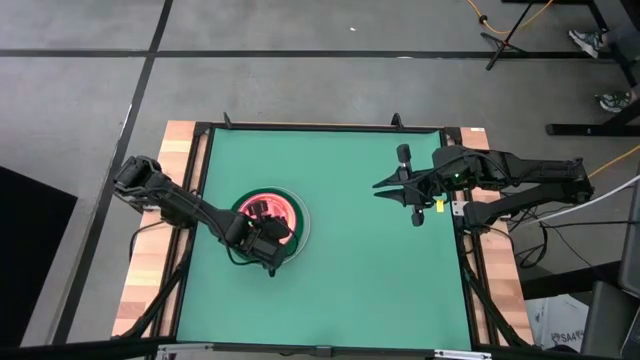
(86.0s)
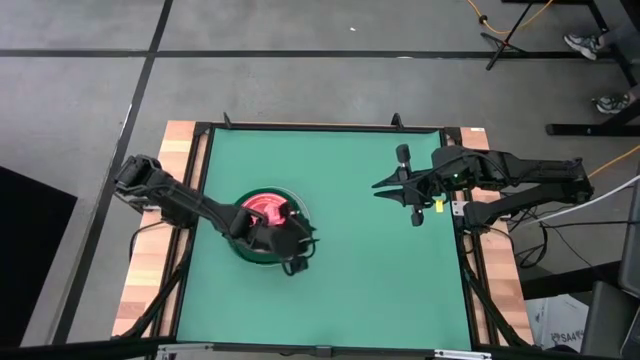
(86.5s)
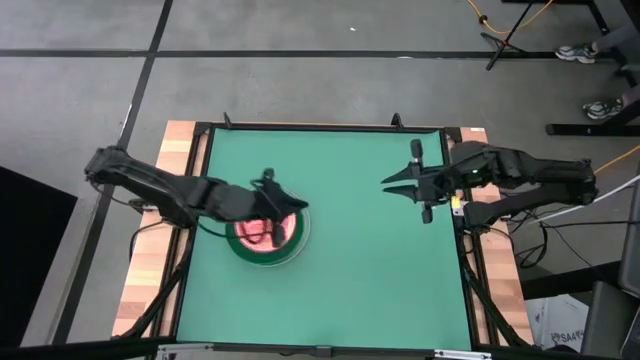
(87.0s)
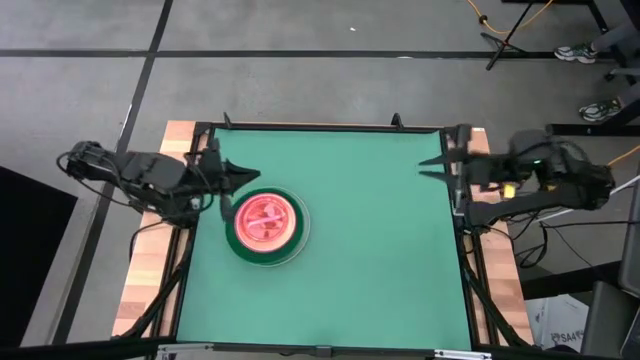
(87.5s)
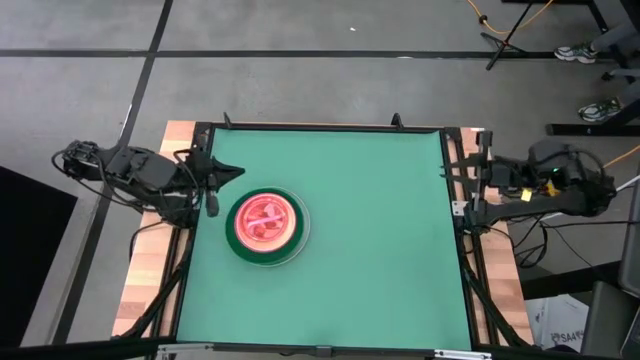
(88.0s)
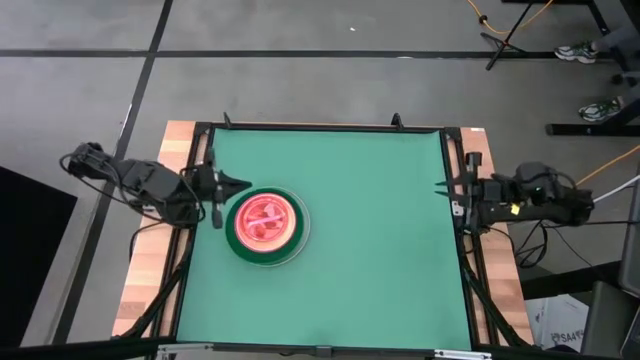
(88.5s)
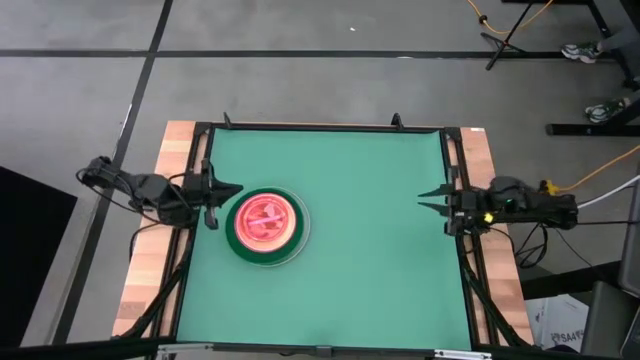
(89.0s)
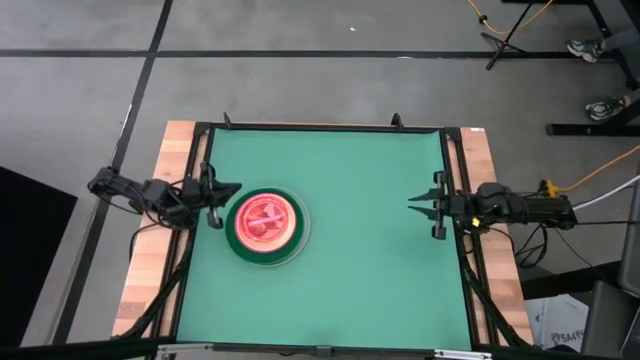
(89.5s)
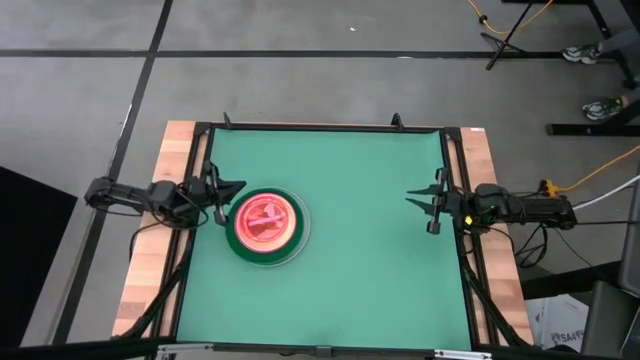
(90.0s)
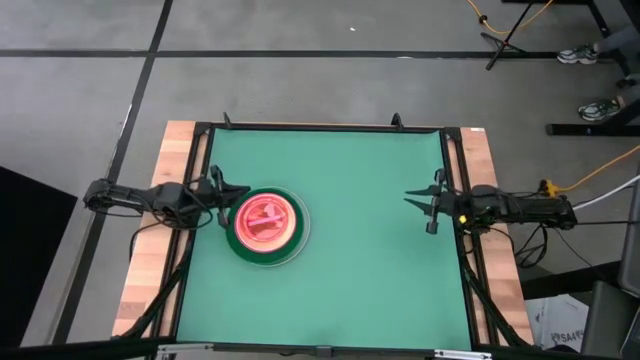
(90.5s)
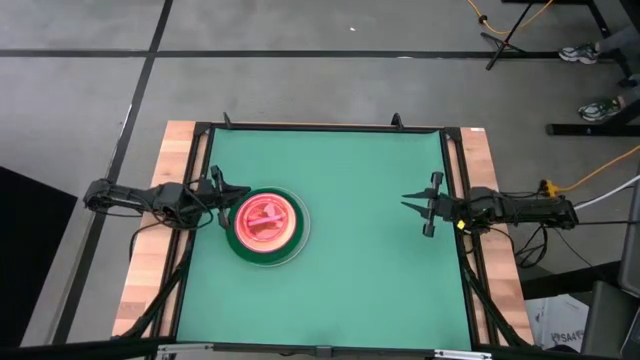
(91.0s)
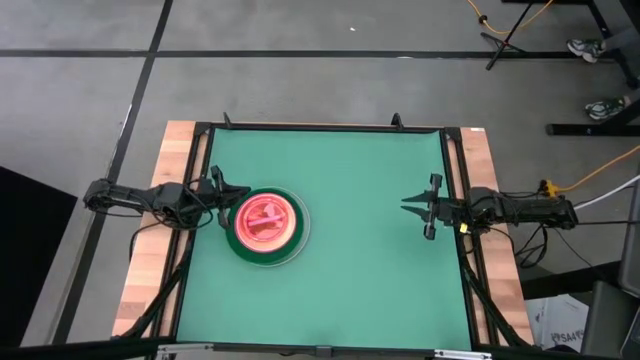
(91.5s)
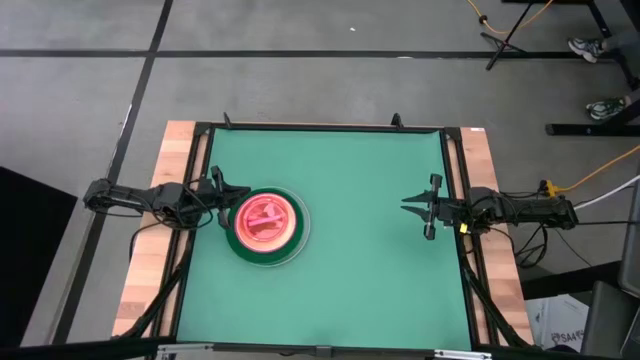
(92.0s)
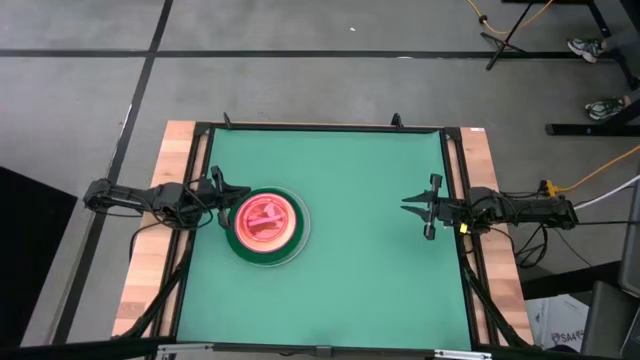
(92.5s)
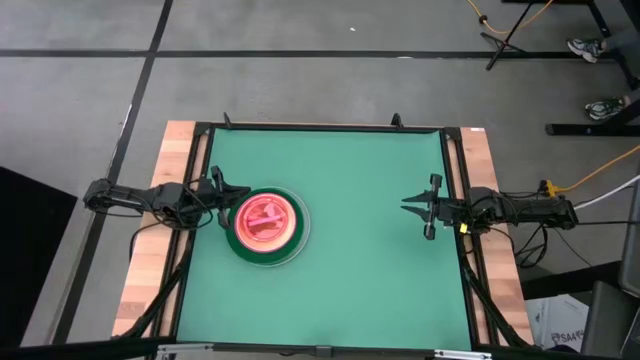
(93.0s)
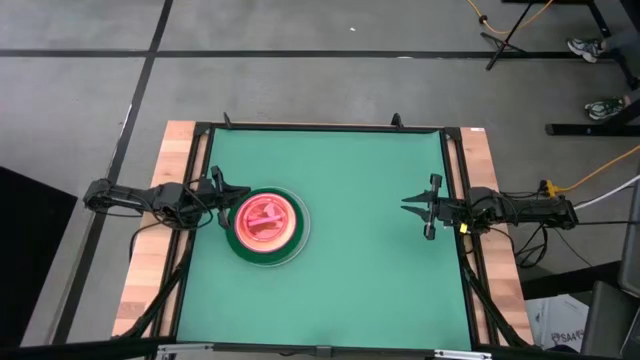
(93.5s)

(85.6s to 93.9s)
Task: Stack plastic plates
Return to Home Position

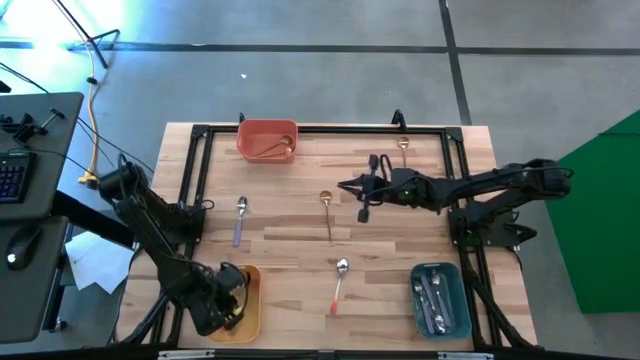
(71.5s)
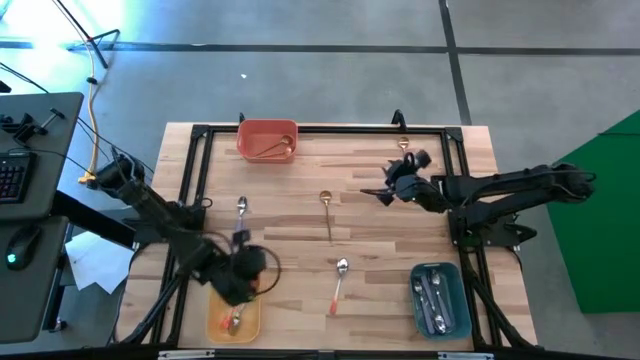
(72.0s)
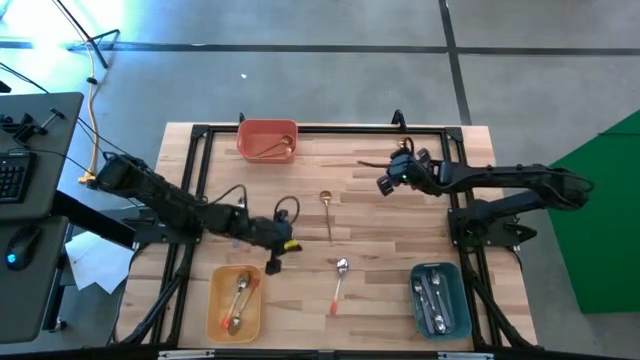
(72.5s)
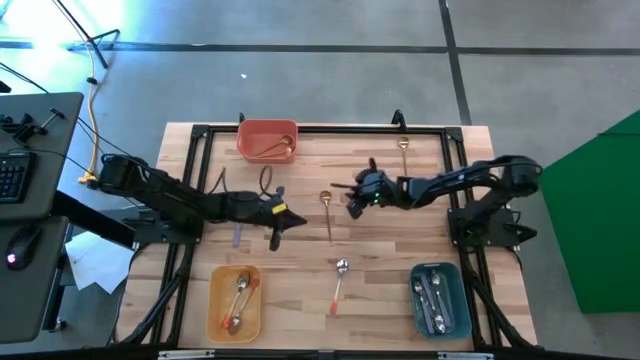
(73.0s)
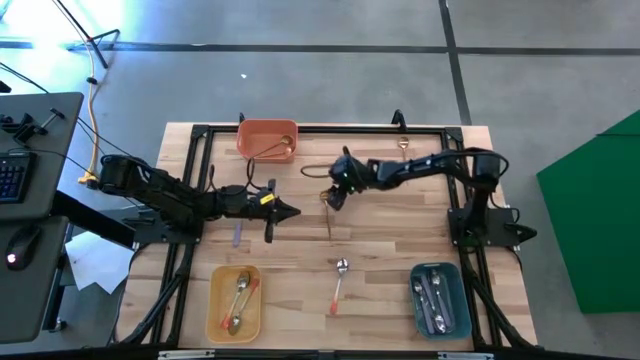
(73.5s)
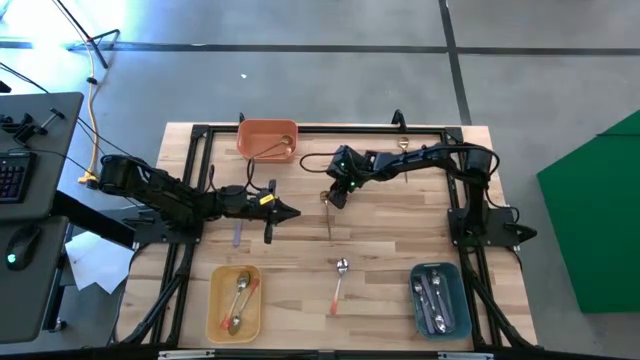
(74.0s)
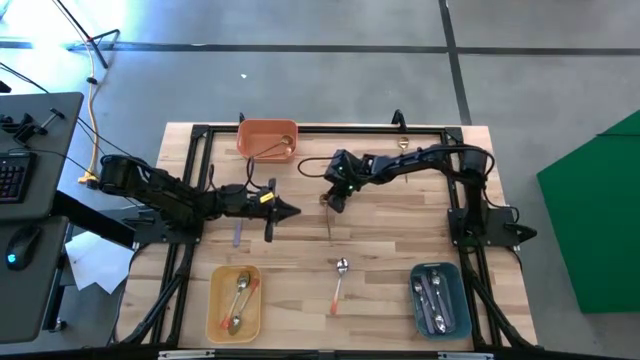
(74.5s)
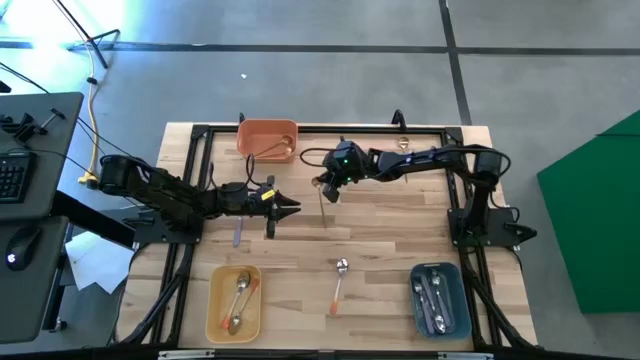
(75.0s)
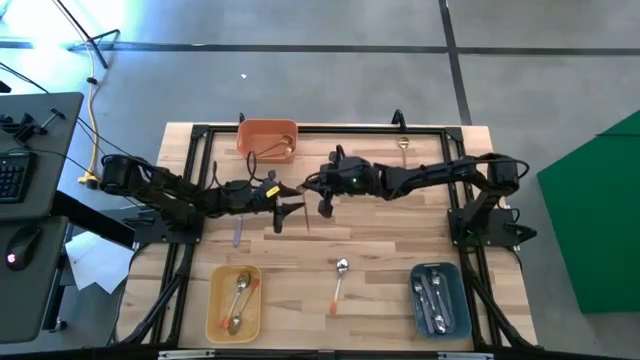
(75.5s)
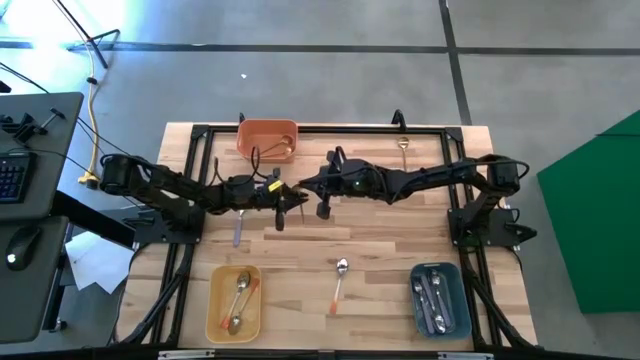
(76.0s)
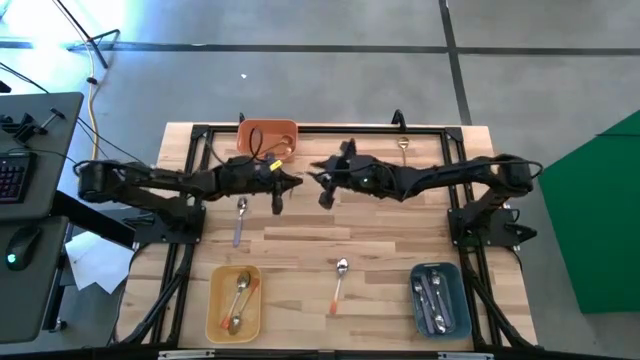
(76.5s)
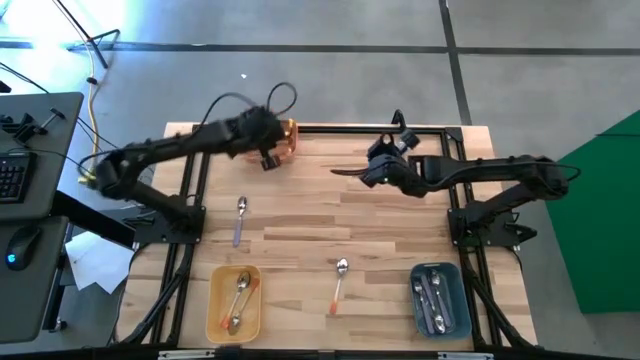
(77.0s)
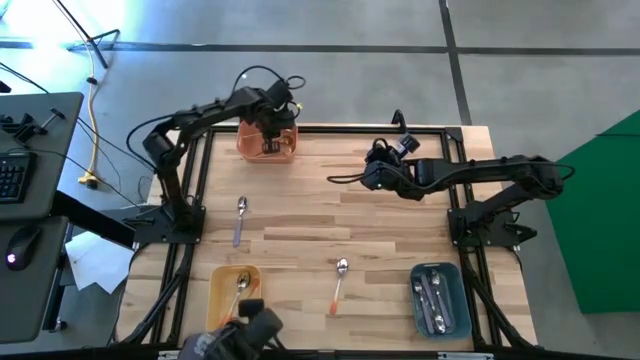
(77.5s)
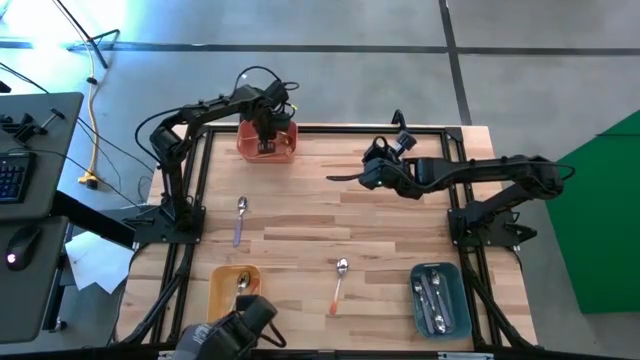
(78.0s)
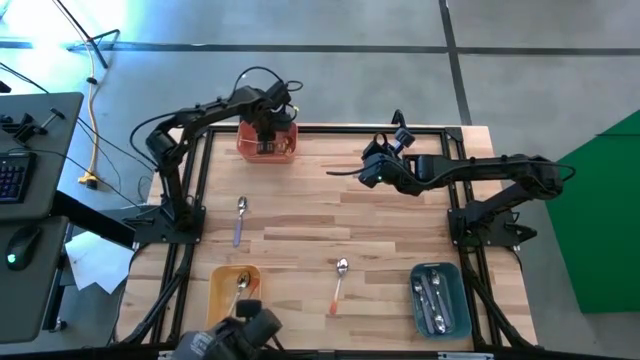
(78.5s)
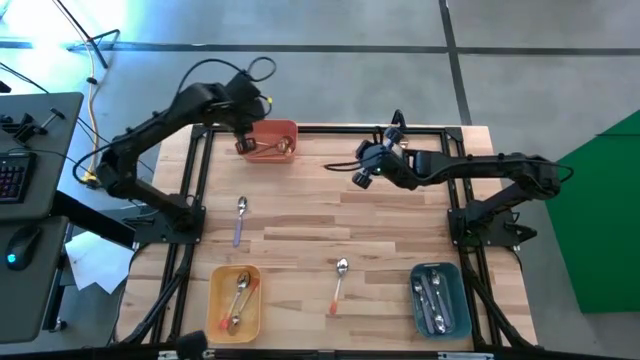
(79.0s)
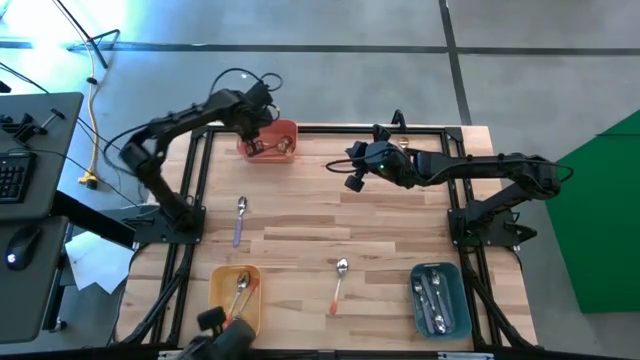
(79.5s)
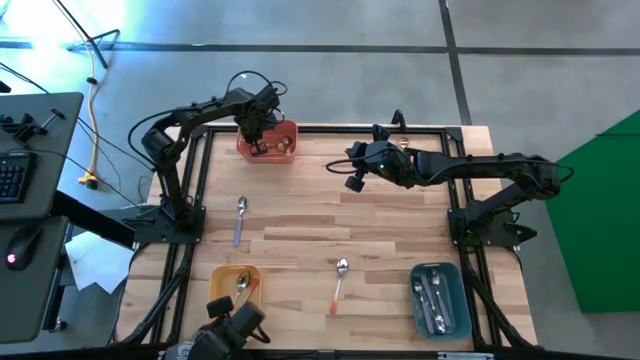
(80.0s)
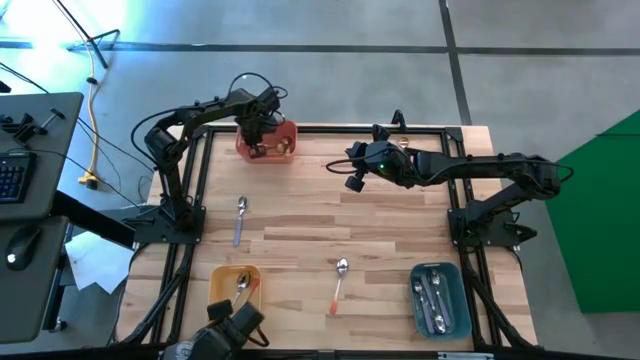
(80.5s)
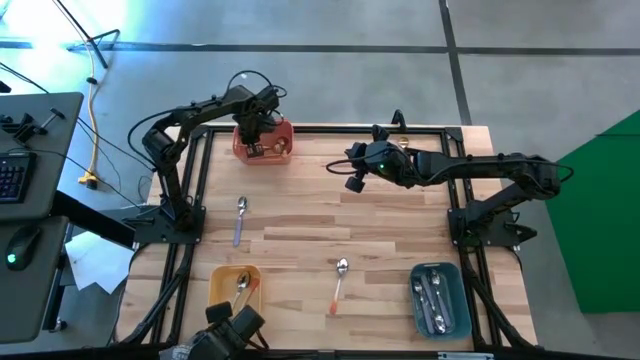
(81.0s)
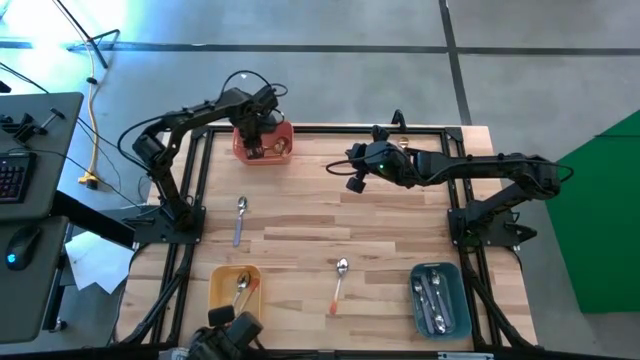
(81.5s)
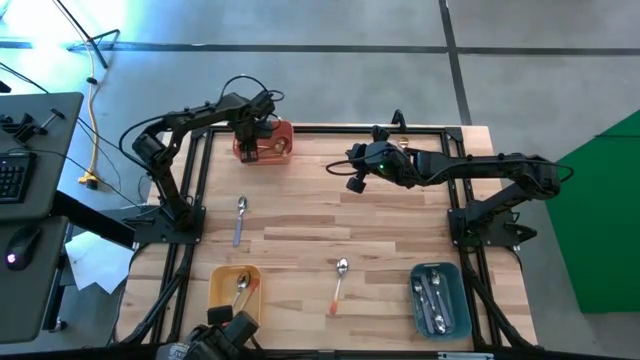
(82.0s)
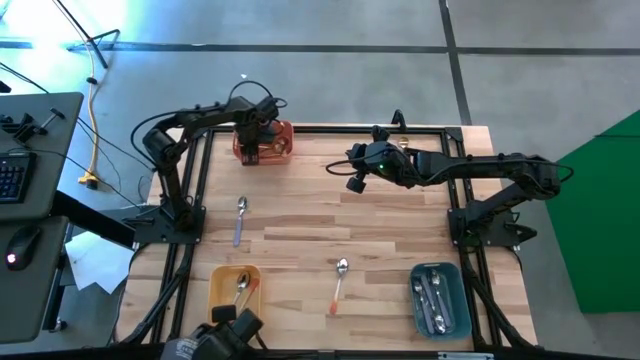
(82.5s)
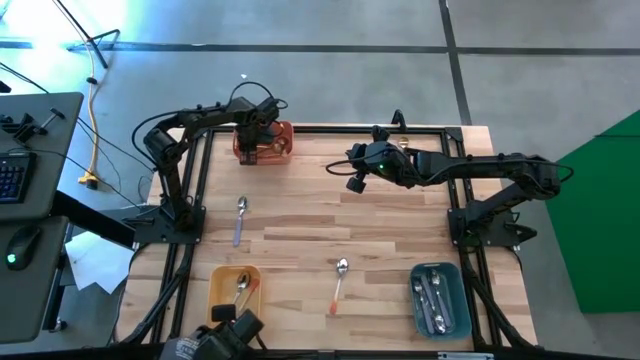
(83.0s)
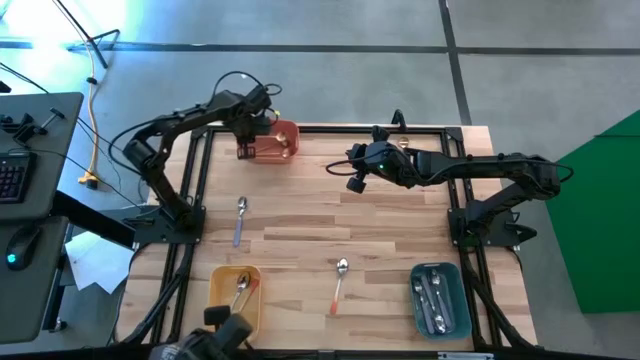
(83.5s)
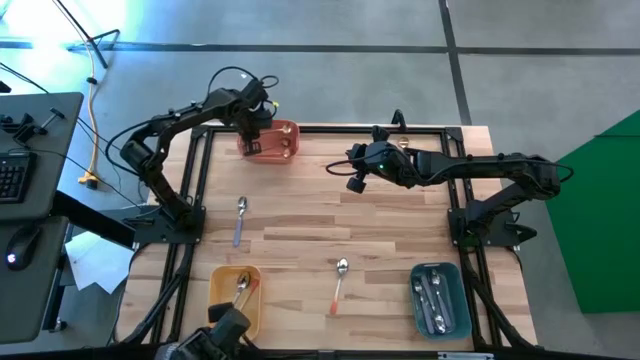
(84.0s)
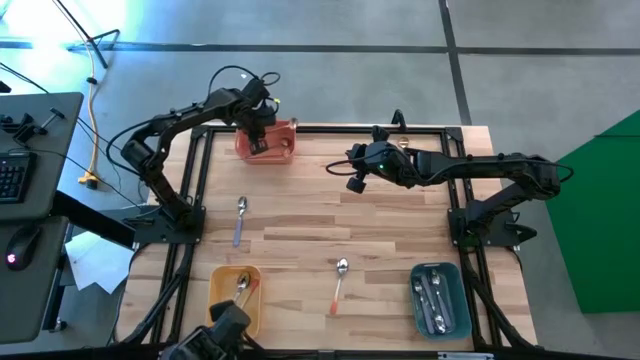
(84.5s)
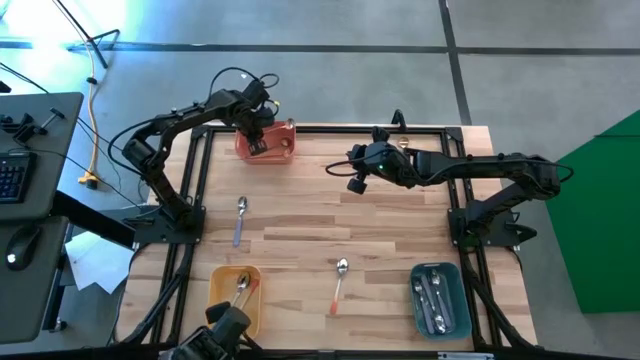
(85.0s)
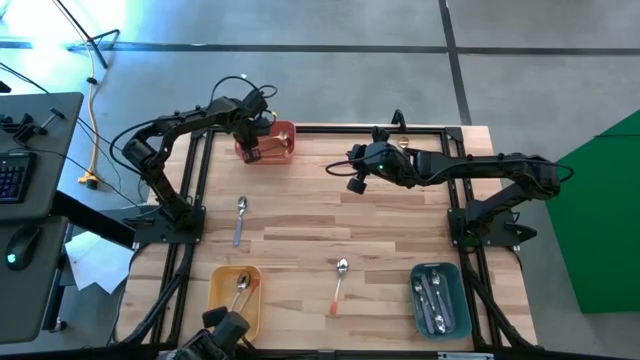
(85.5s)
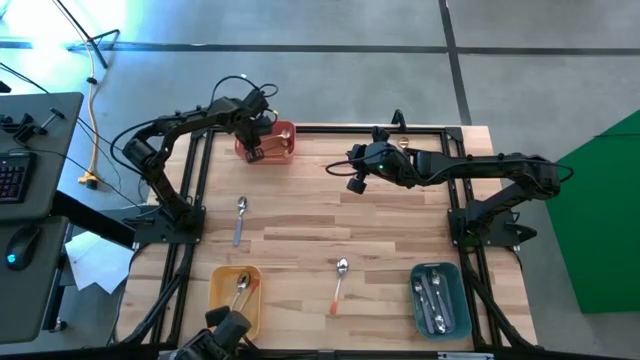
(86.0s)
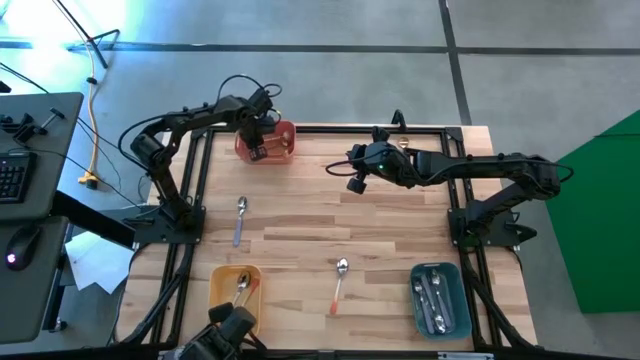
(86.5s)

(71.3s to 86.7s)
Task: Sort silverware by color (type)
Put the bottom gold spoon into the orange bin
